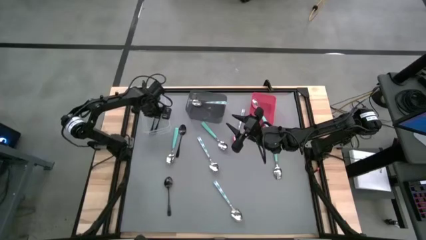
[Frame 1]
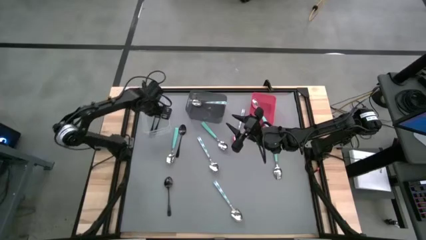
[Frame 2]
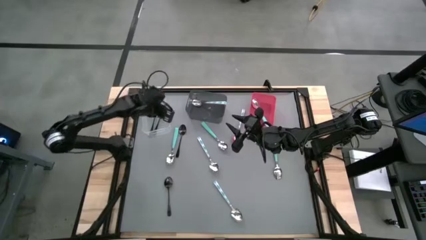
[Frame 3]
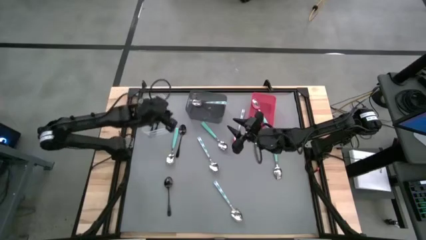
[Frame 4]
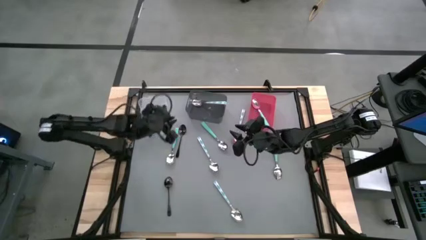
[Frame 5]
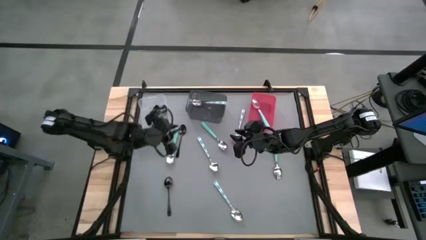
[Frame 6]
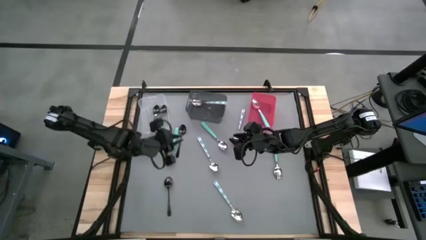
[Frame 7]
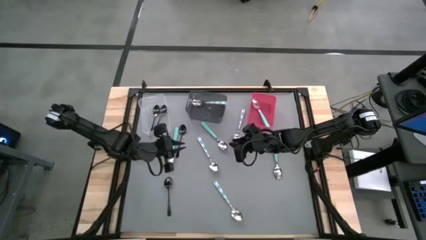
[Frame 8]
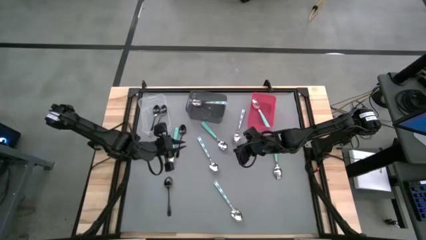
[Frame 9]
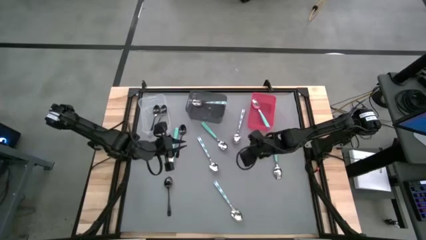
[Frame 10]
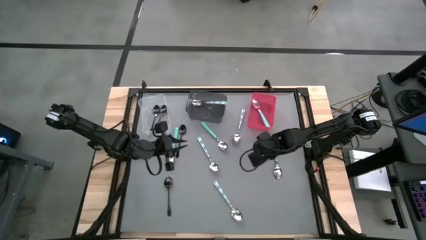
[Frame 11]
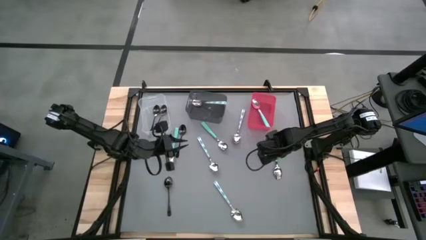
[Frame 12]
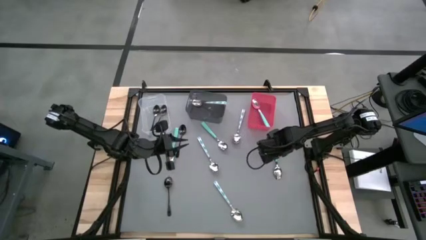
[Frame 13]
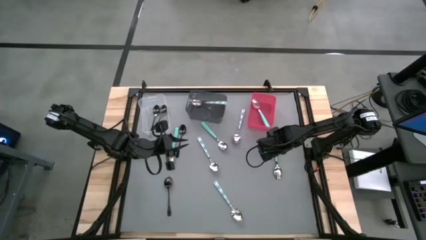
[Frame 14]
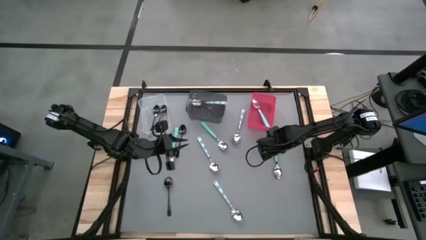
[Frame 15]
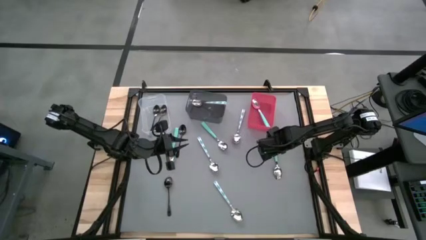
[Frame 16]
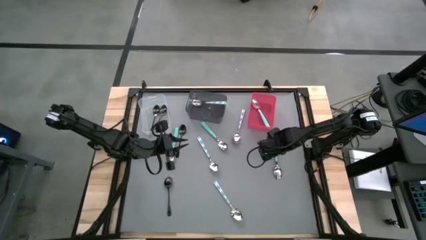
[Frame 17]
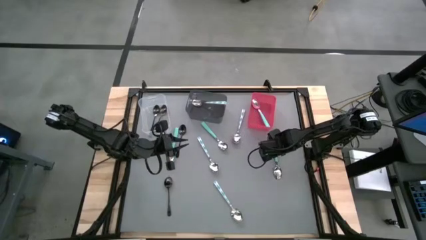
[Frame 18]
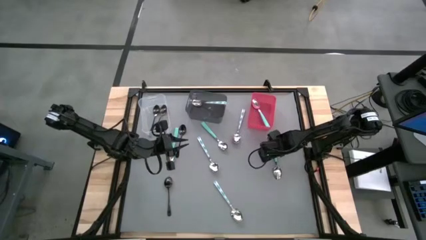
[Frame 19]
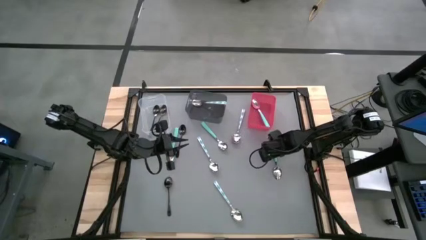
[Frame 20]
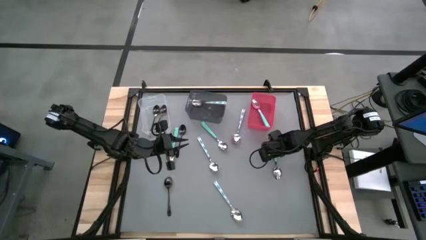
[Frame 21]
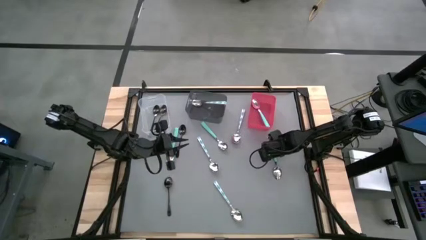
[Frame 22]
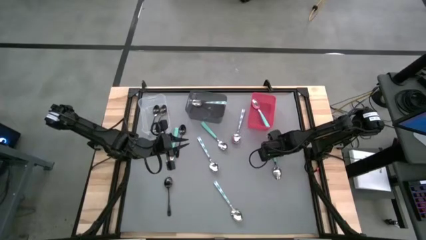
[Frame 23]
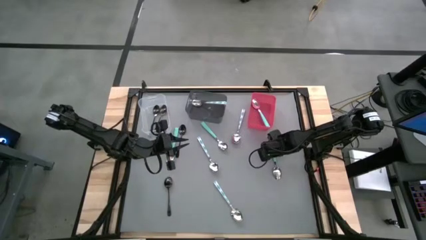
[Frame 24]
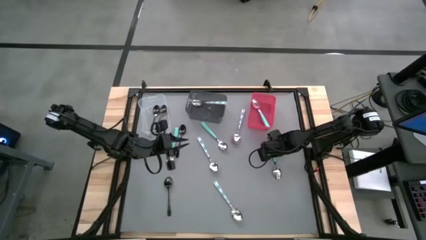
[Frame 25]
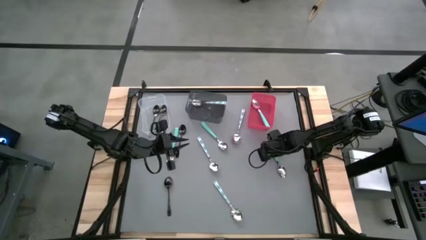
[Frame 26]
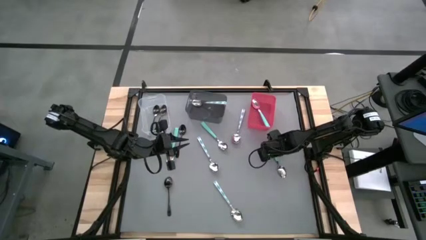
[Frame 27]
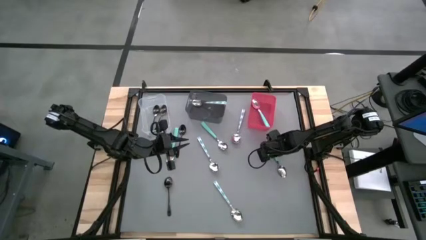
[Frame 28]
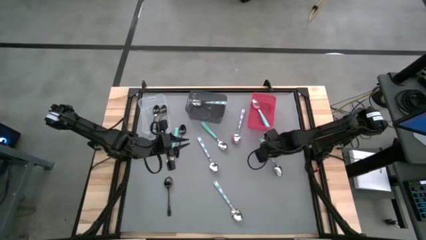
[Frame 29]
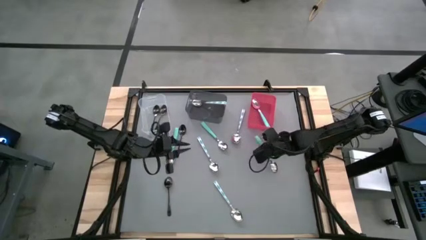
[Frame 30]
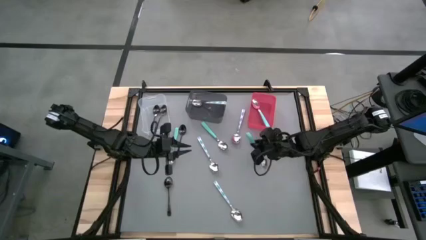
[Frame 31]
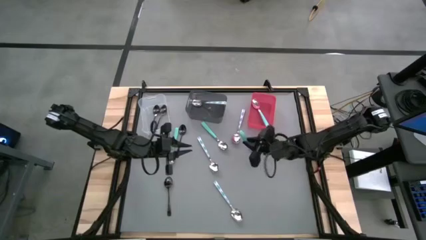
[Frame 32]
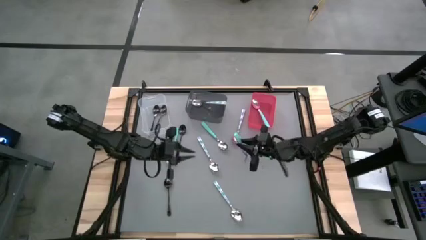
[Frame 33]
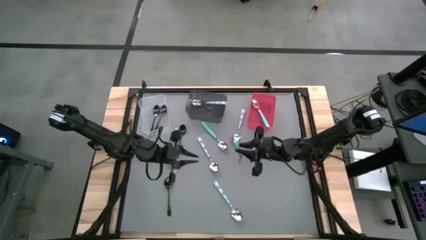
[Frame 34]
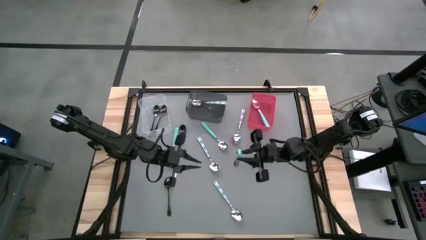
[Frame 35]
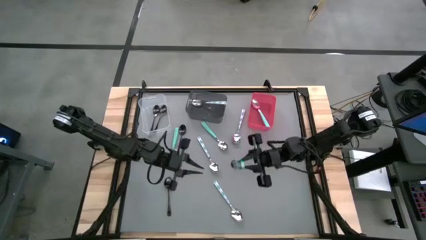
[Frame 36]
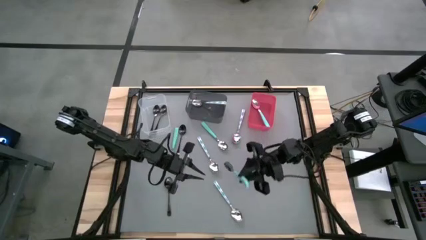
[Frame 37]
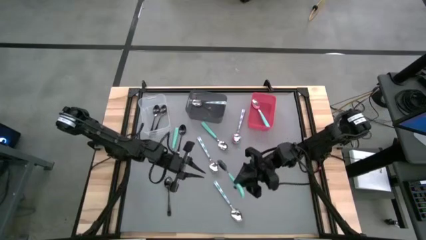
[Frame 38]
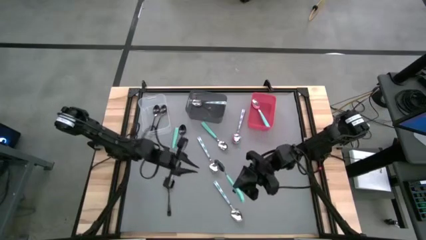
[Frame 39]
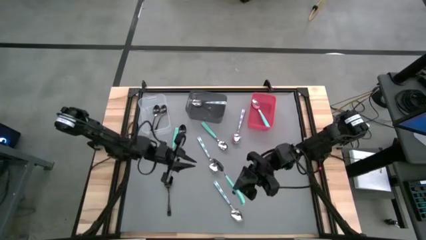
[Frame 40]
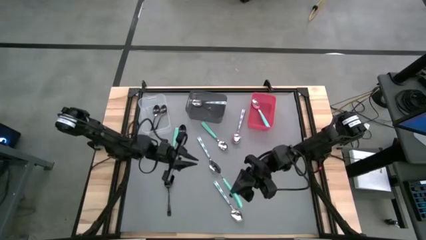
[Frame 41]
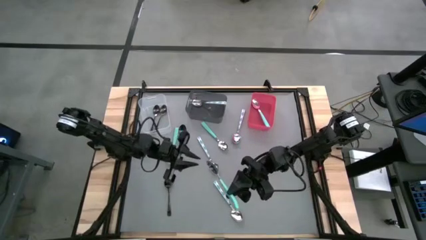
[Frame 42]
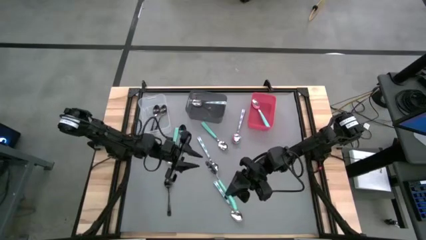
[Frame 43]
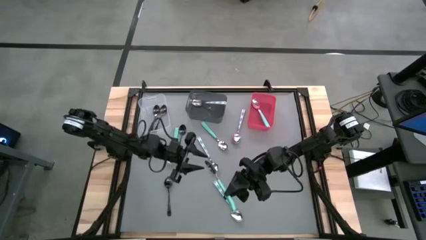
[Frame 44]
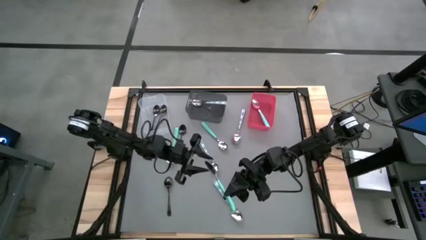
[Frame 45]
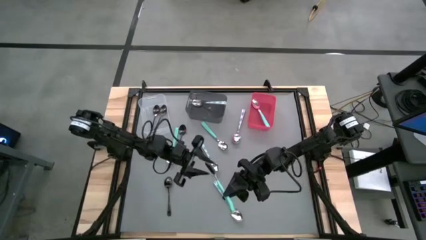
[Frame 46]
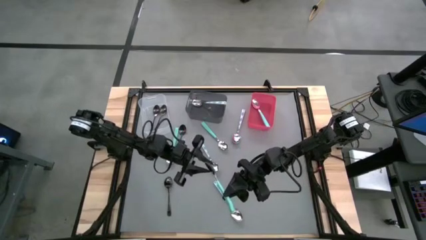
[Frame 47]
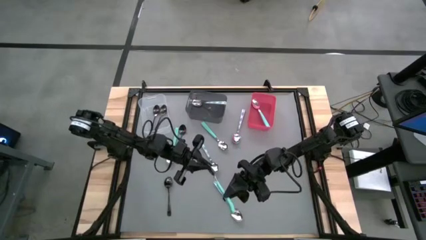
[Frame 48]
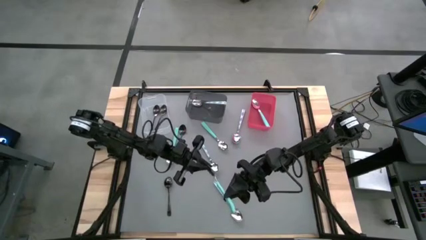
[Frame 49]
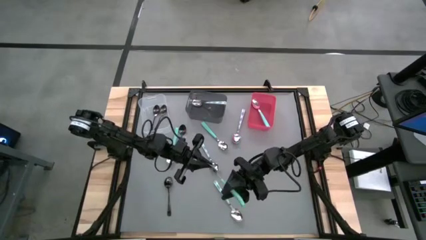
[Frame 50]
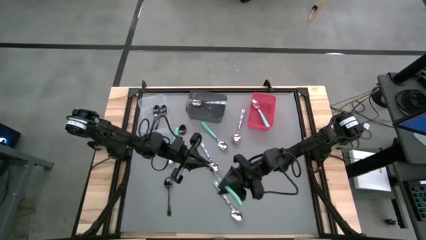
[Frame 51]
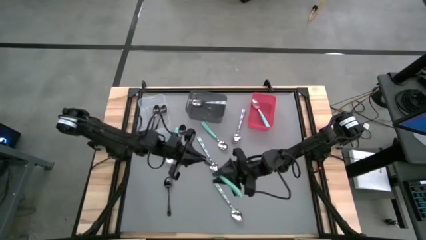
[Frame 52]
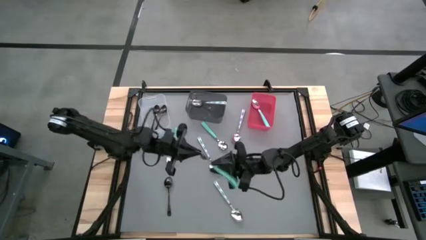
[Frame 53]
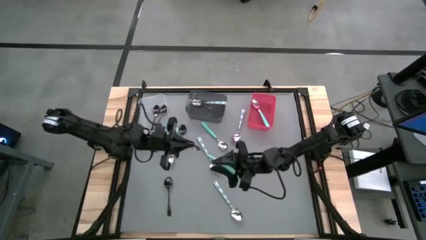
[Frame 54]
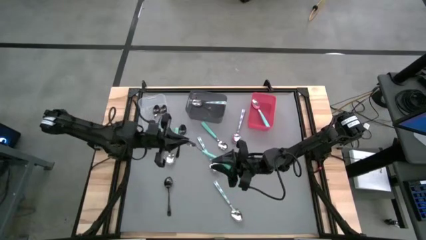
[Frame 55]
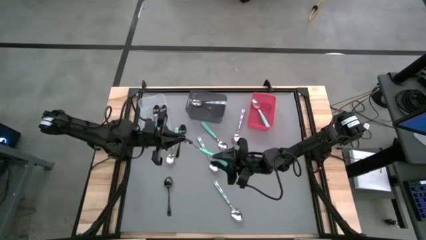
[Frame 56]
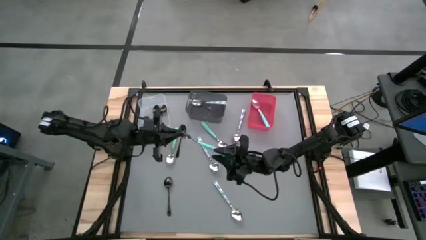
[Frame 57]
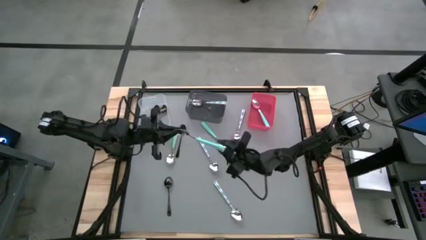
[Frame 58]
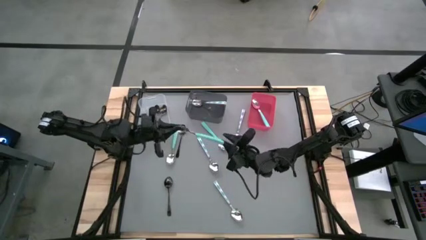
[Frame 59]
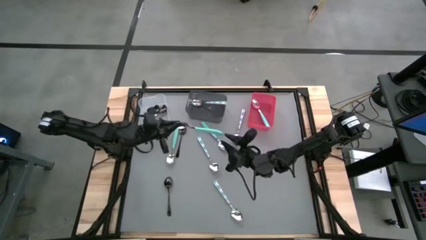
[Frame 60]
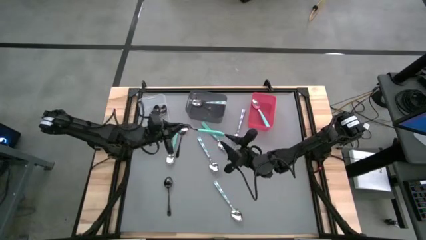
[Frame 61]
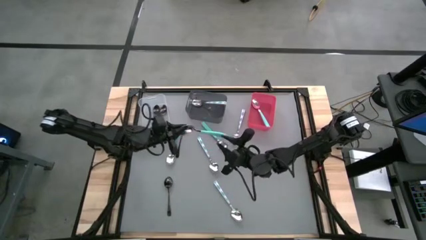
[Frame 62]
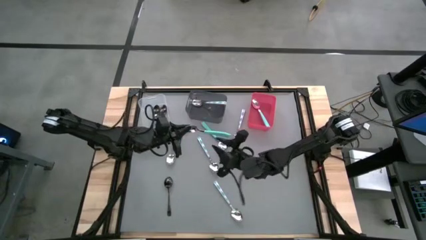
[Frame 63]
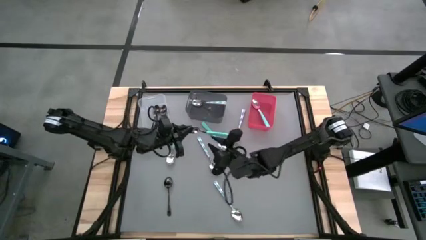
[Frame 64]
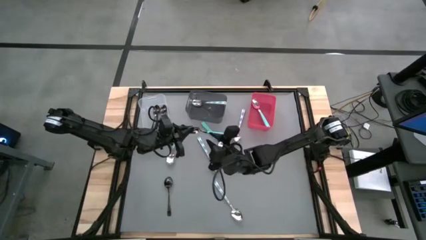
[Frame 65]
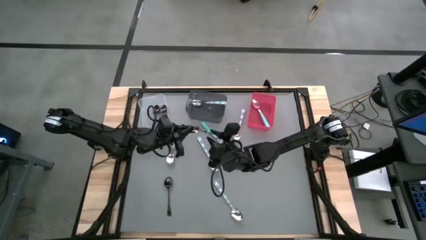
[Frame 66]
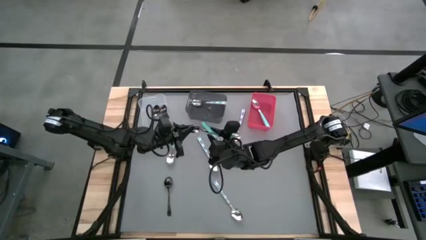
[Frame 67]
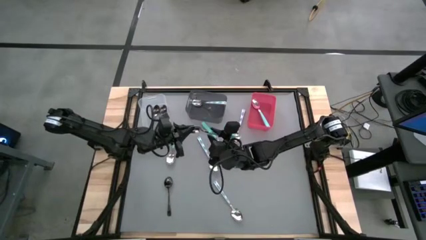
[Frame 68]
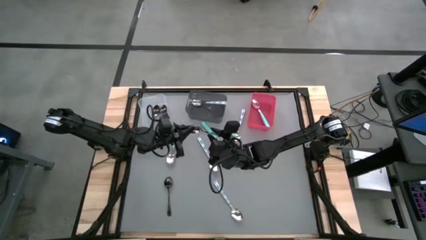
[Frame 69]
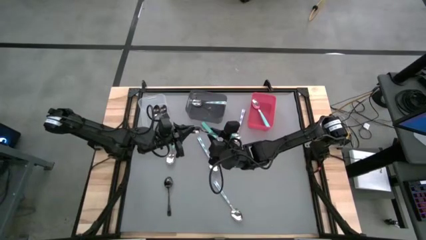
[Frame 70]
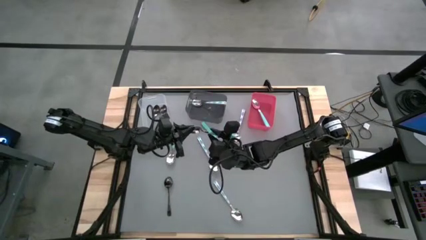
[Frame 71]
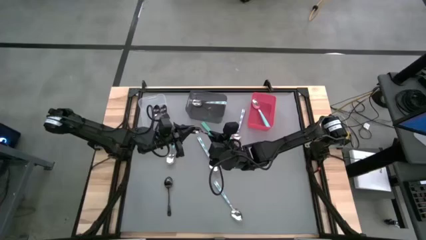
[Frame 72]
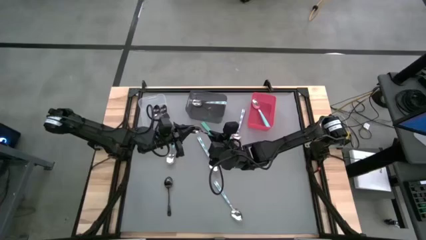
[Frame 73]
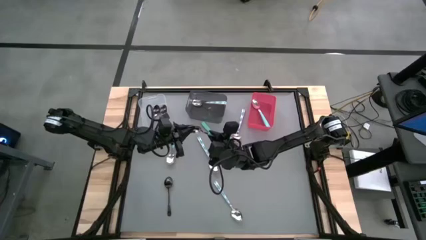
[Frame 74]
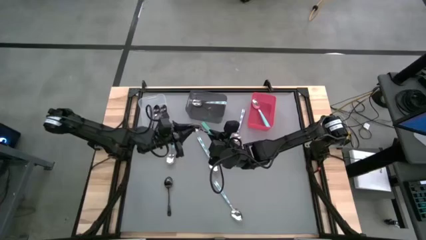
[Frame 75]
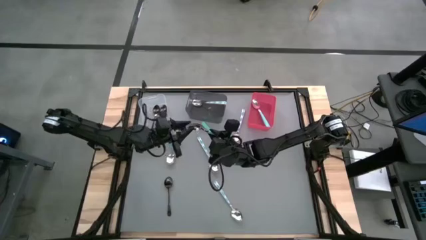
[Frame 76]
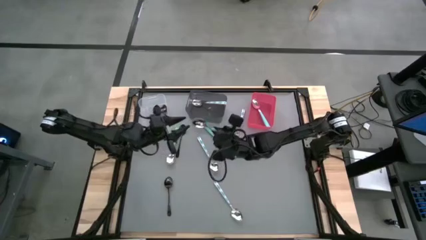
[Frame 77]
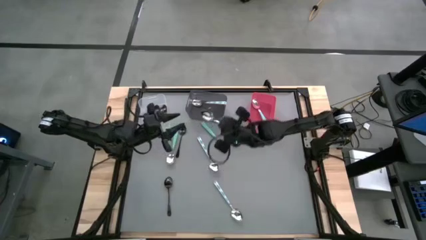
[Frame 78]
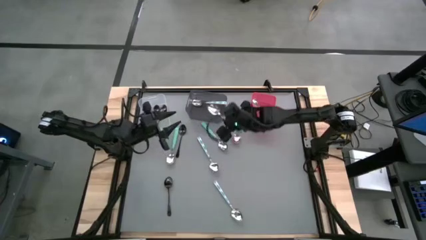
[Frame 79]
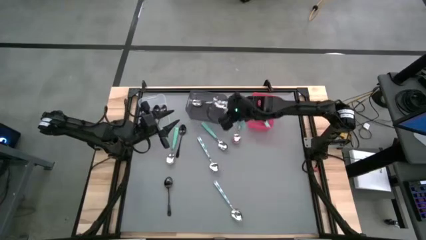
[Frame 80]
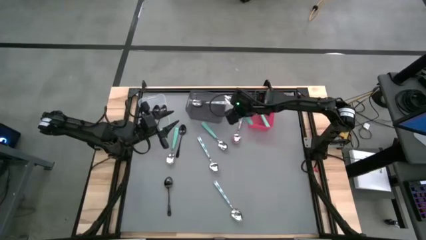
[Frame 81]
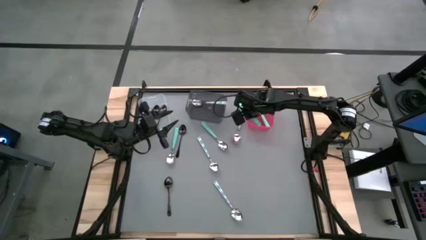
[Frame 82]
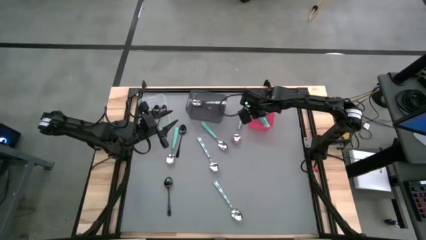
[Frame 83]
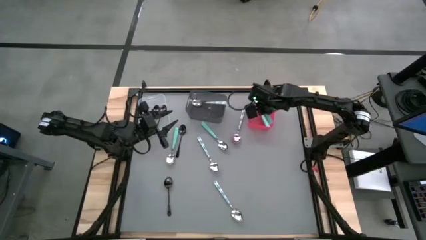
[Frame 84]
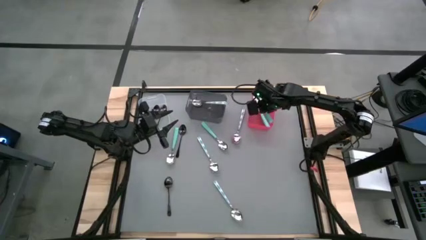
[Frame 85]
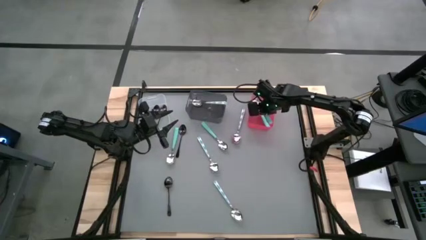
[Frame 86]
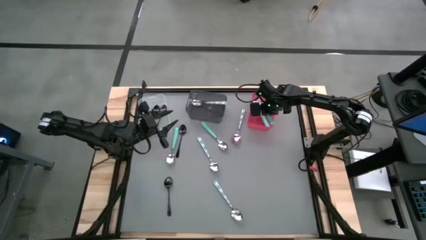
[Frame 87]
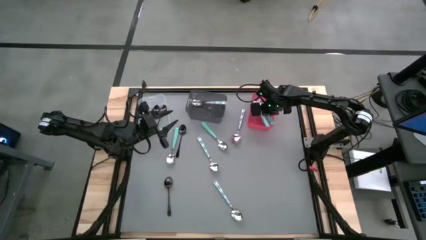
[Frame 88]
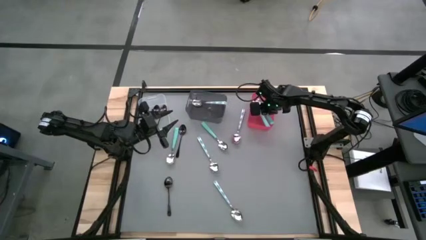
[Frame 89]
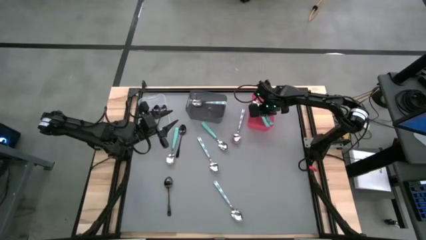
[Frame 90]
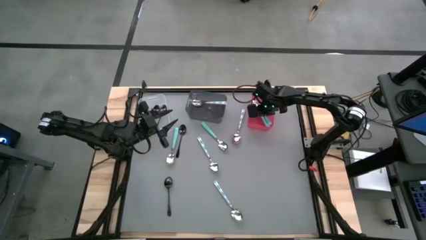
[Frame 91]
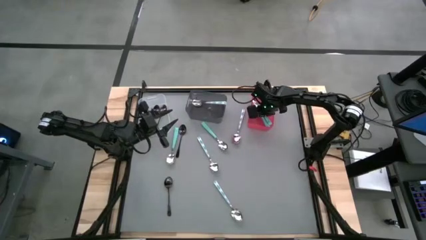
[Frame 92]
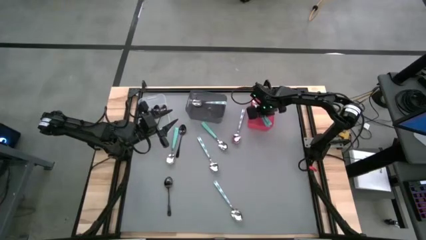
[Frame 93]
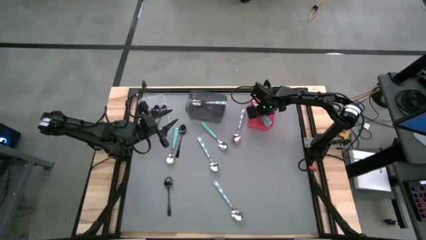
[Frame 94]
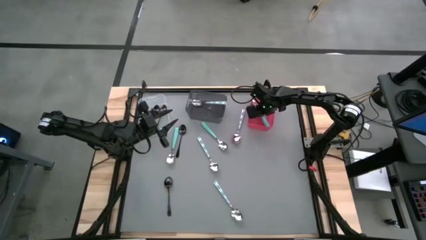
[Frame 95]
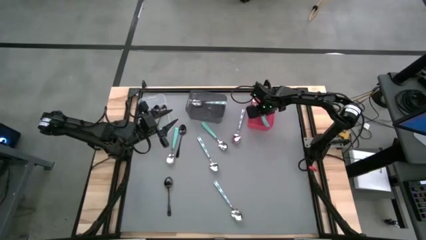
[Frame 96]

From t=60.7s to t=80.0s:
Task: Sort silverware by color (type)
Put the right green spoon into the red bin
